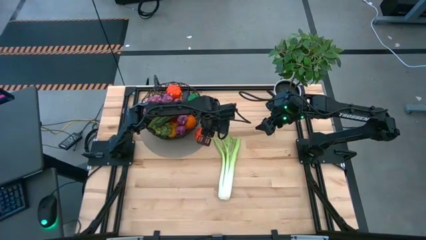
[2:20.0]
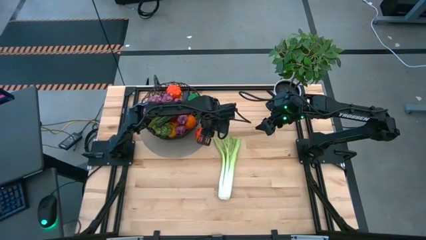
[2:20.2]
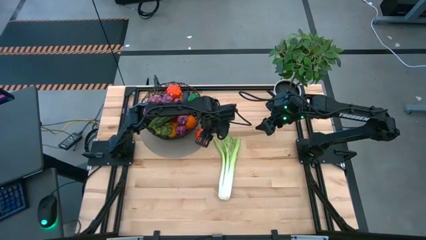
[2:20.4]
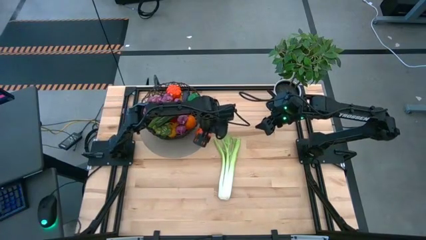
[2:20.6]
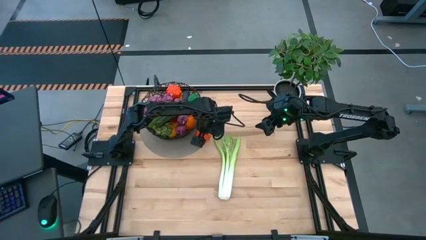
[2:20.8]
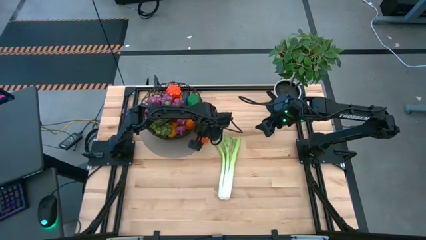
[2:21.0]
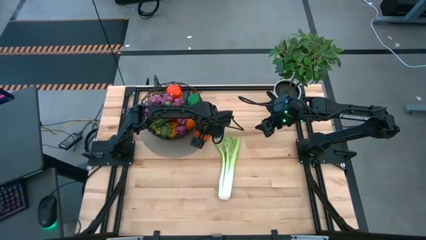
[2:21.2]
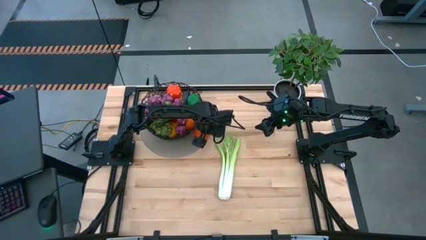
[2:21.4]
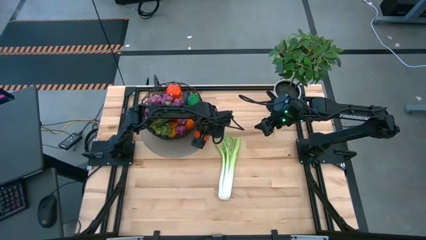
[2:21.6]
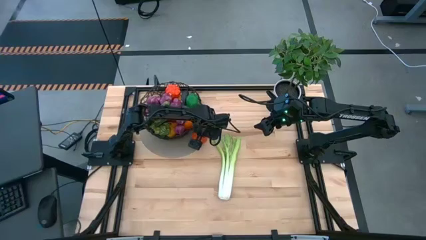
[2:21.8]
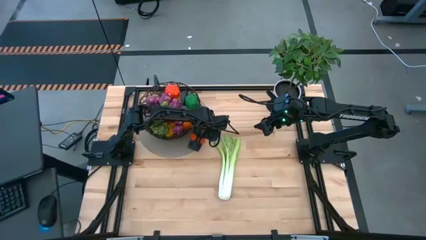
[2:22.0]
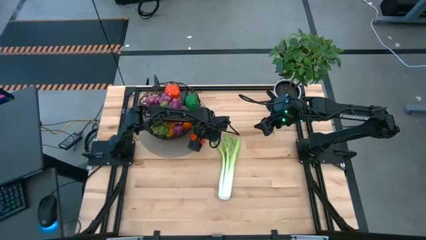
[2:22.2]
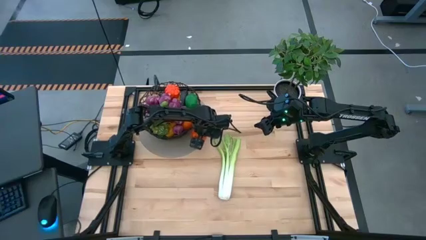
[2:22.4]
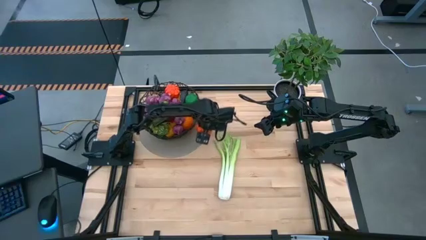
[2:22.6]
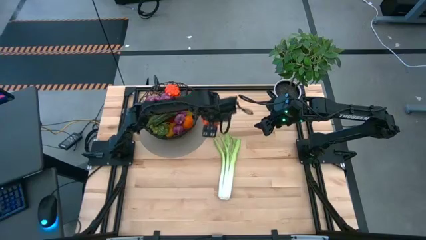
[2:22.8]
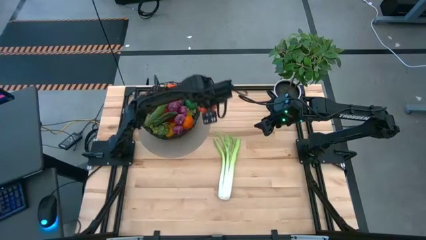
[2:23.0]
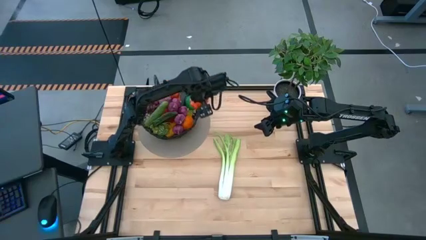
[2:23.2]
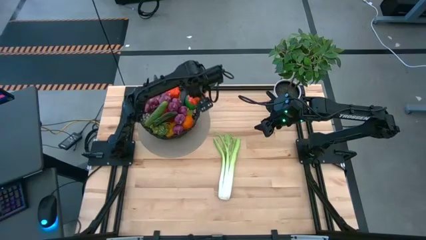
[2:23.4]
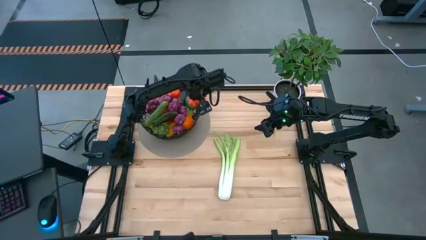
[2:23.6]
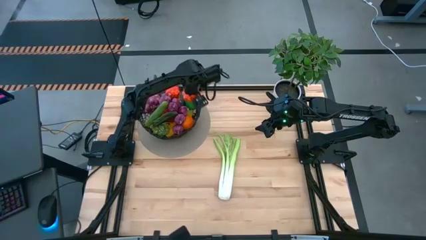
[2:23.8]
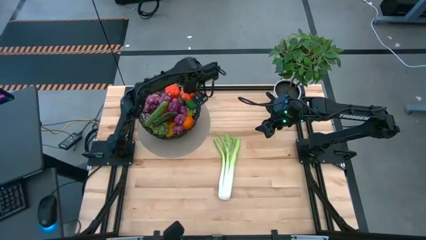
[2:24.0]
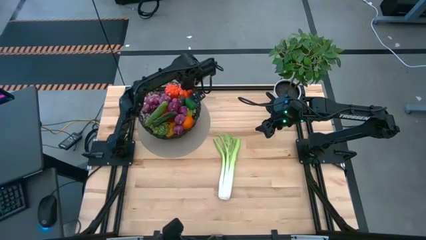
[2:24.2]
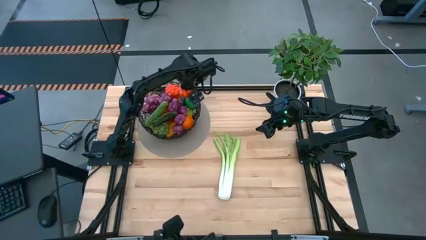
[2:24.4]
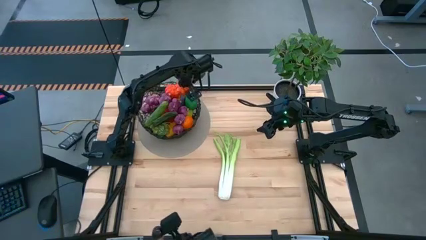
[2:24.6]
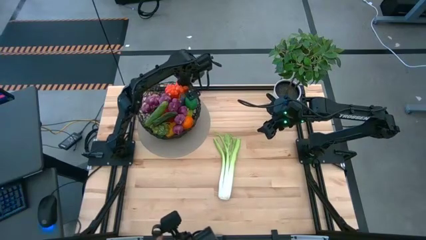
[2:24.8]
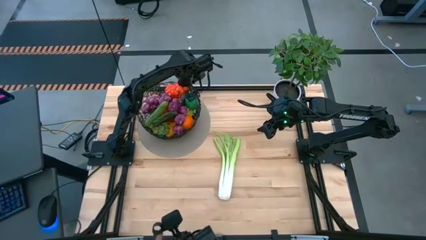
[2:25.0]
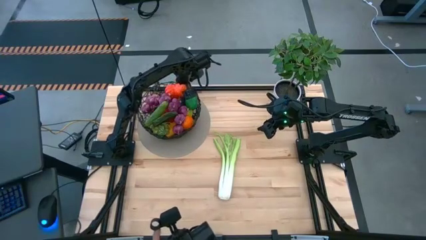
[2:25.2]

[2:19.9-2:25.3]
Task: Build produce basket
Put the orange pumpkin into the wire basket

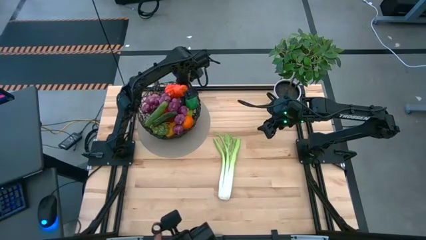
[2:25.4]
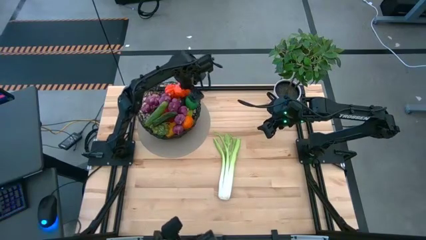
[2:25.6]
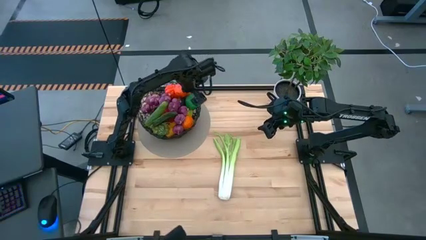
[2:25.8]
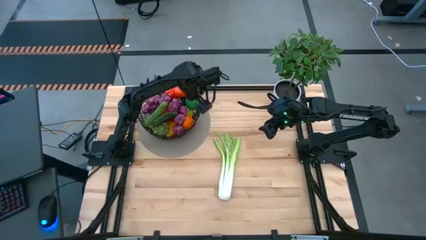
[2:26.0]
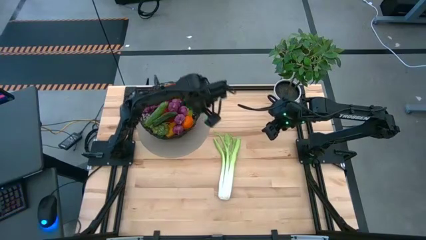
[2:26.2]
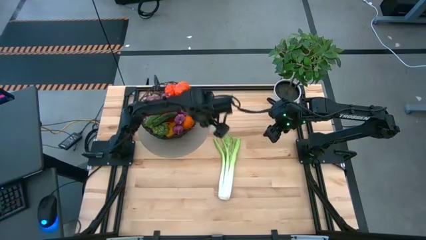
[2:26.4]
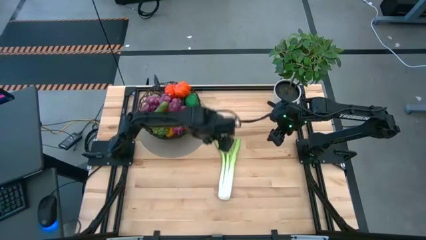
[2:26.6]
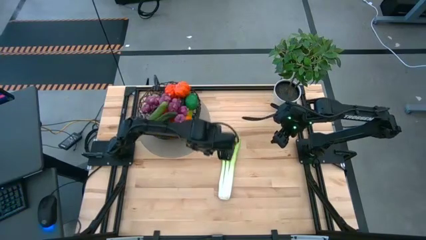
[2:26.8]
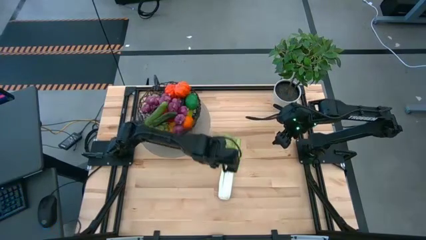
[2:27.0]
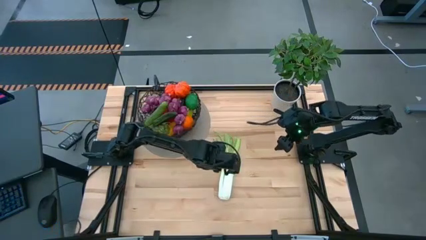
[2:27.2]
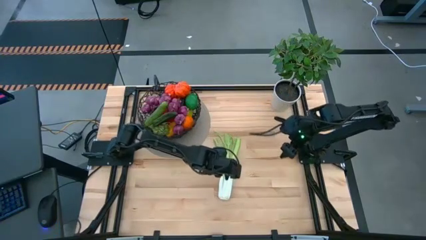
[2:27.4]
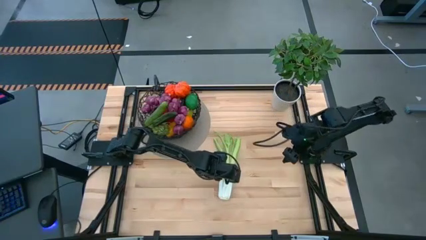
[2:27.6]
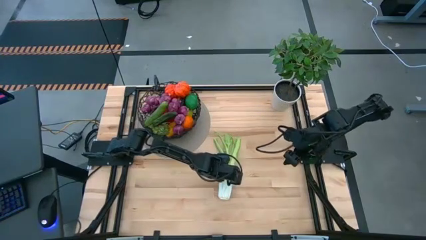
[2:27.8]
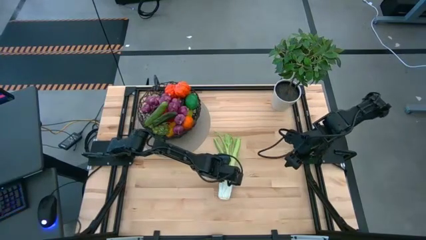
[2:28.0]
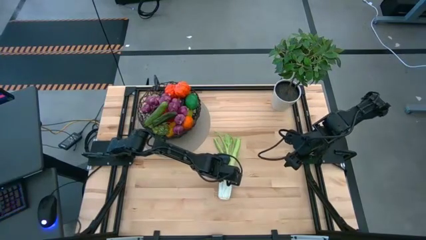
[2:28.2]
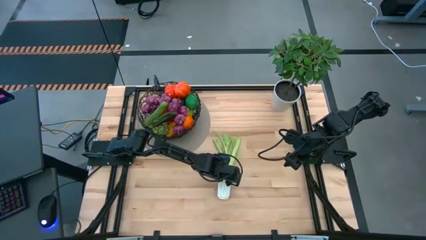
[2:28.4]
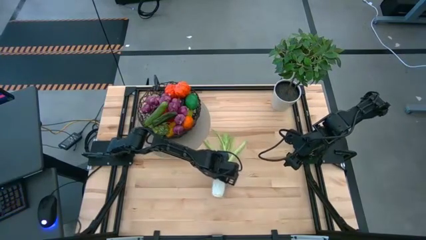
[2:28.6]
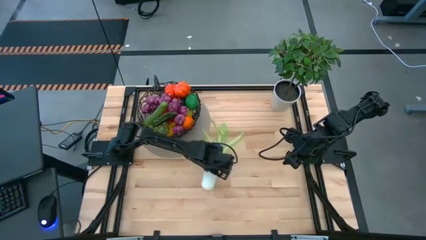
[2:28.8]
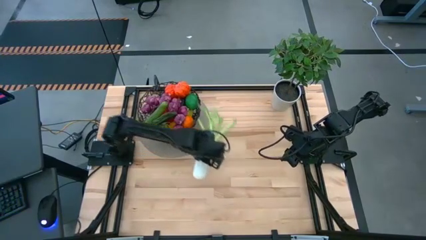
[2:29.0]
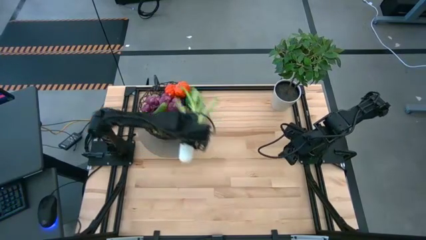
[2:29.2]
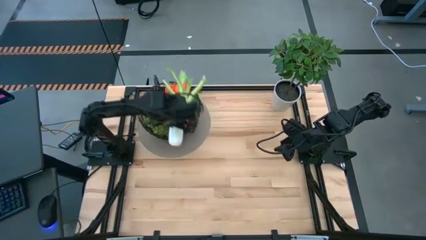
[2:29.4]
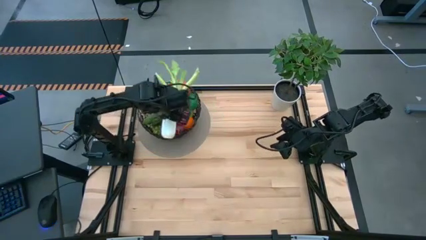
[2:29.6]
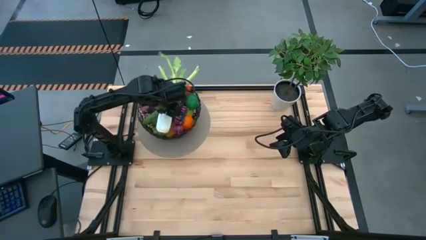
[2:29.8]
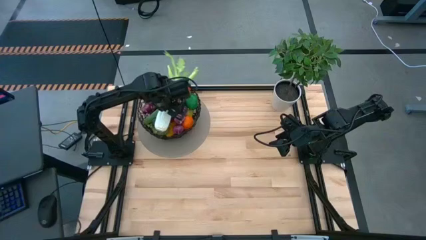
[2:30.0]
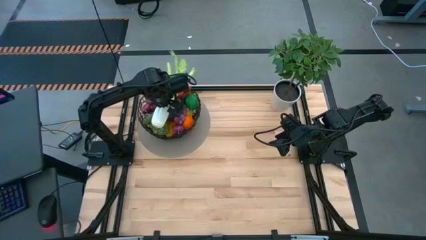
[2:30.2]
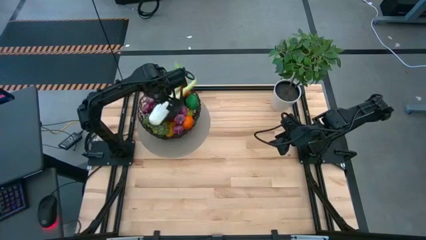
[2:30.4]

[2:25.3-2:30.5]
Put the green celery into the wire basket

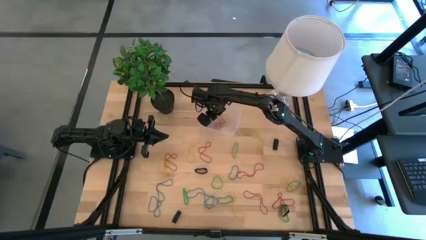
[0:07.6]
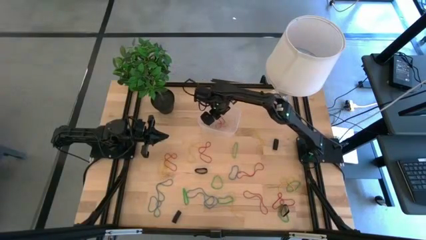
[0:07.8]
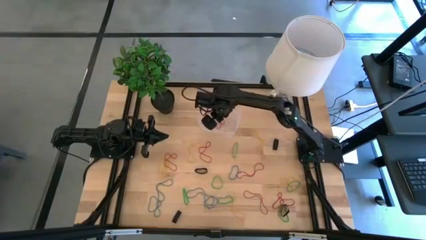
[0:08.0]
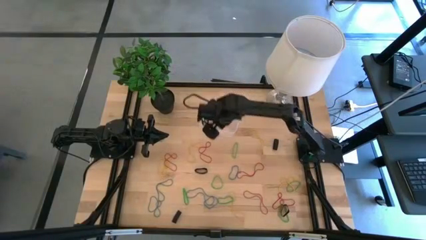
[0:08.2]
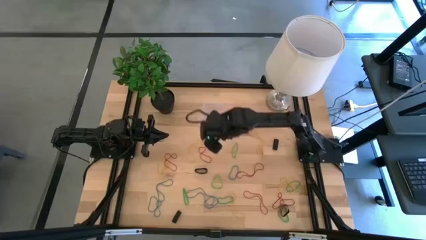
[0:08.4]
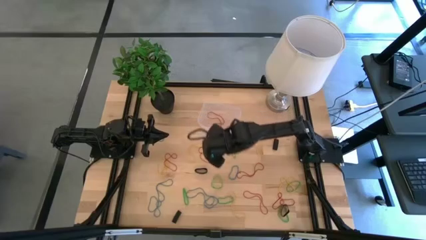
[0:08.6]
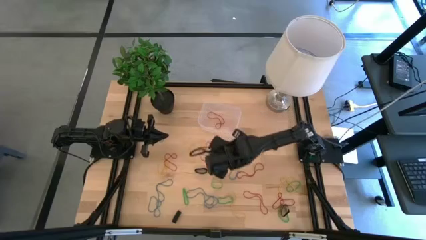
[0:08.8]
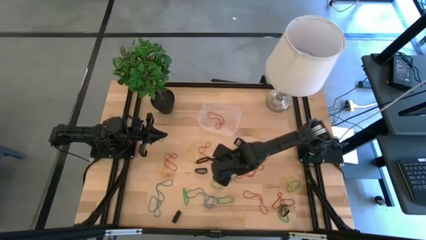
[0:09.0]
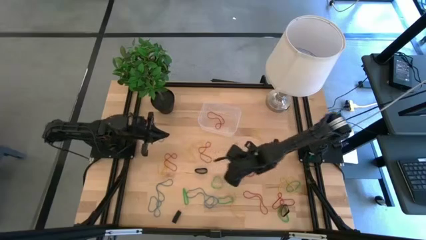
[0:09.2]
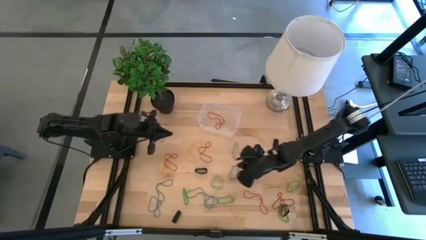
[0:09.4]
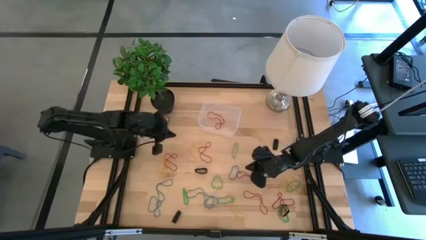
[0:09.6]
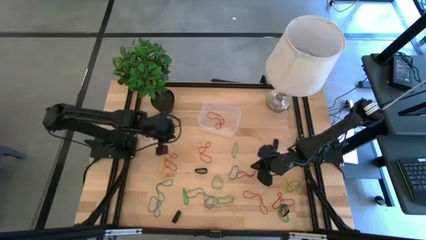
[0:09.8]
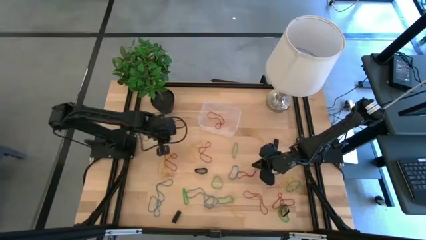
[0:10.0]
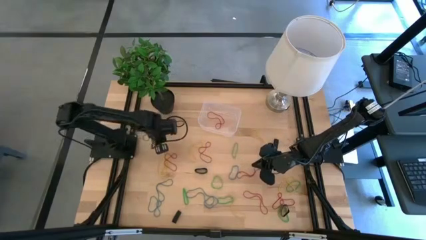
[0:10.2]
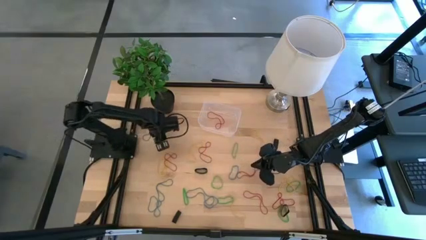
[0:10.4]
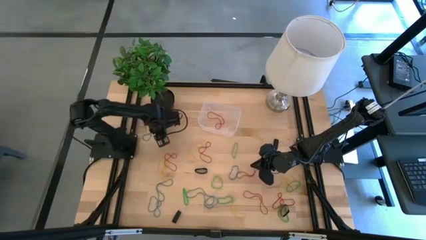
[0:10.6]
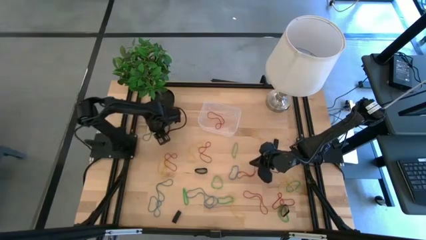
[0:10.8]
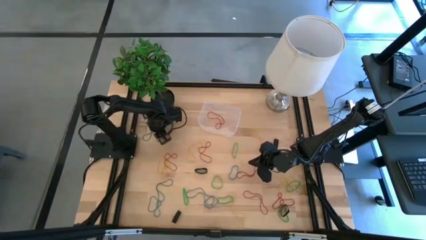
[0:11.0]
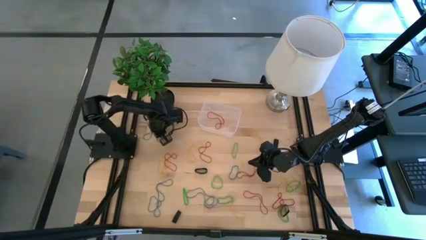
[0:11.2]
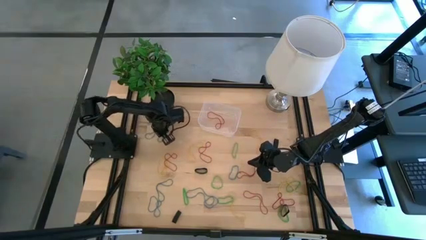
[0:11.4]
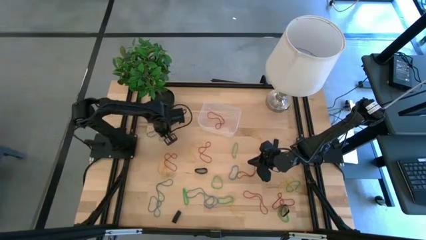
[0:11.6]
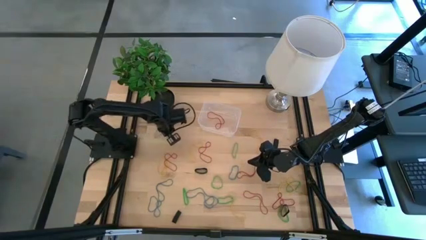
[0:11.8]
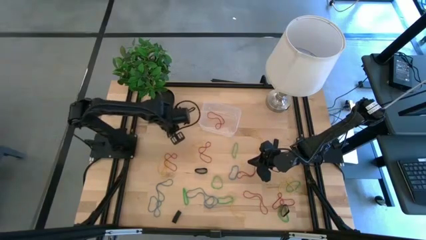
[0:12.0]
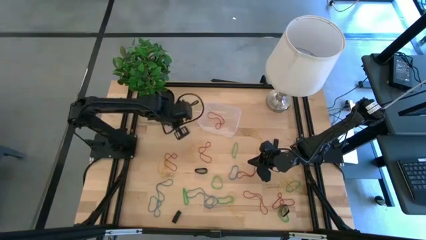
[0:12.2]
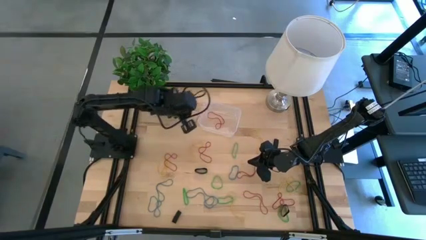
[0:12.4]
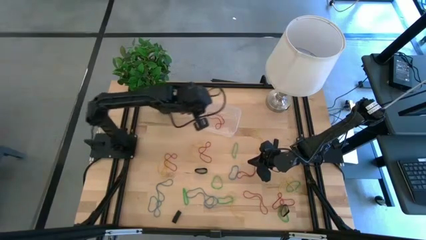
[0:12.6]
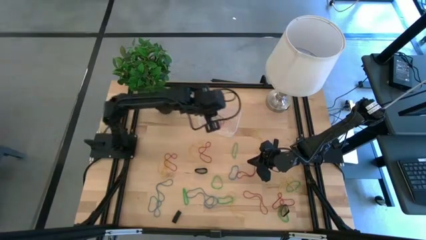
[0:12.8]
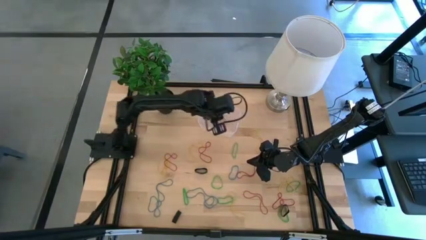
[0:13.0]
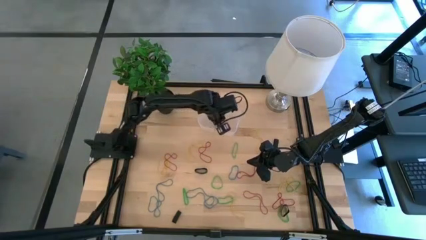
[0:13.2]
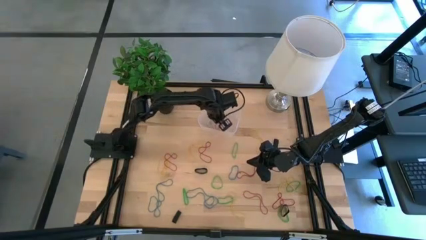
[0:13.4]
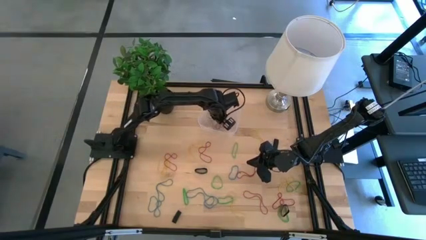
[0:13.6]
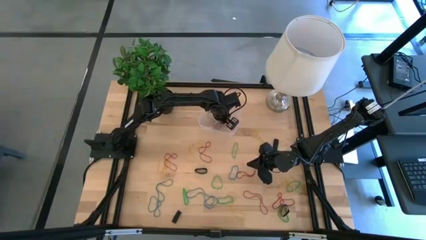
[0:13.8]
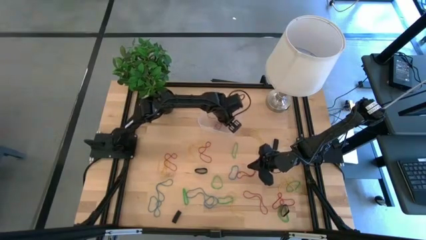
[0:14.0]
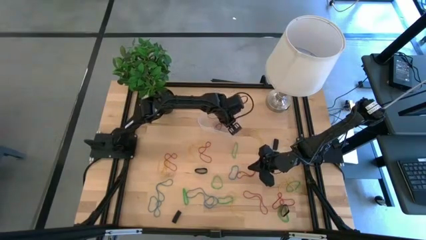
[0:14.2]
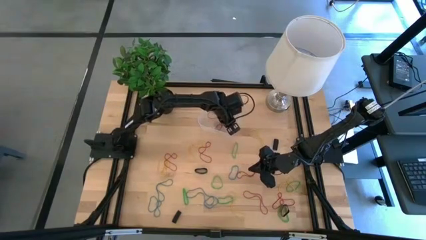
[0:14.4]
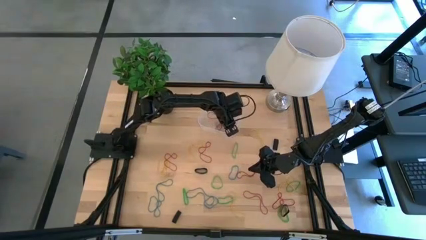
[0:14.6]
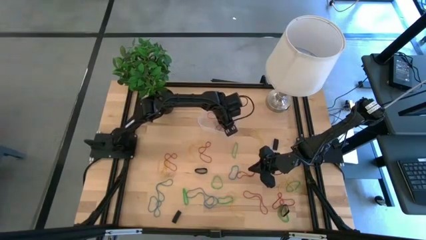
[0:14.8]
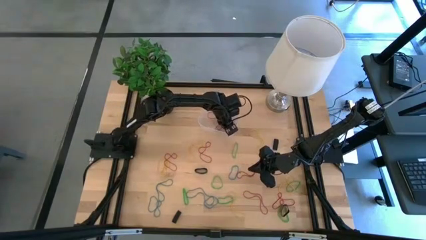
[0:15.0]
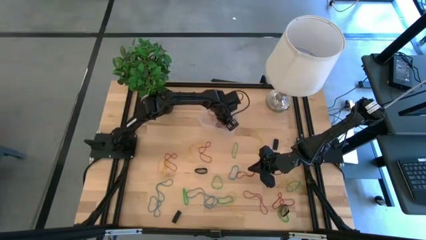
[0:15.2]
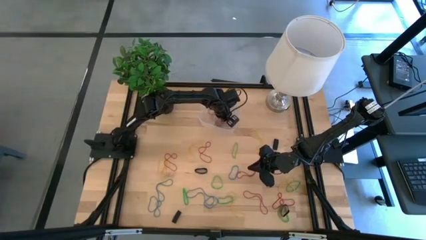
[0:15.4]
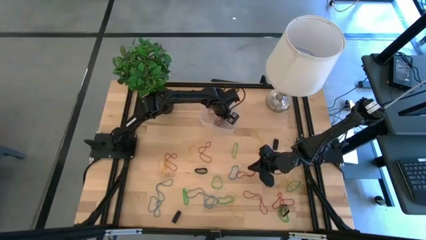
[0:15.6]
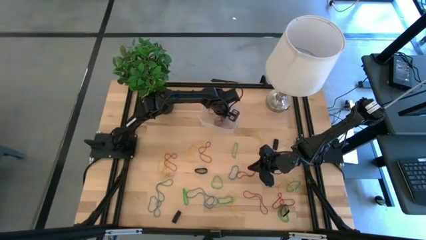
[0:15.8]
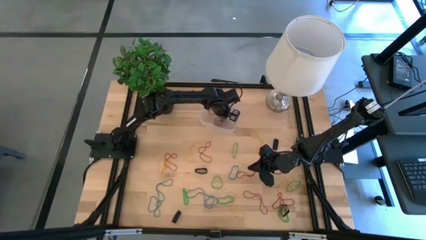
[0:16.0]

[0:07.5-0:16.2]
Task: Pick and place rubber bands into bin
Put the blue rubber band into the transparent bin
